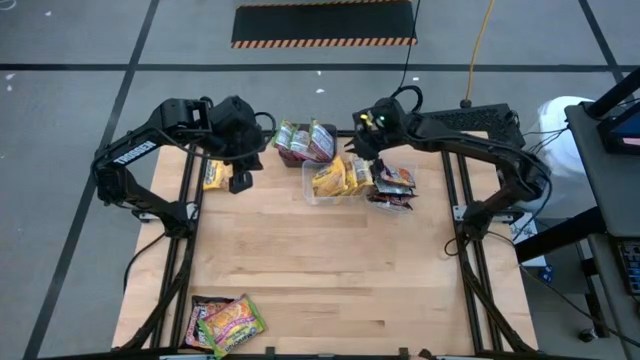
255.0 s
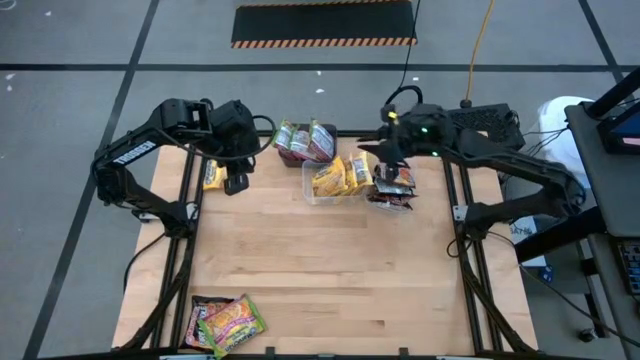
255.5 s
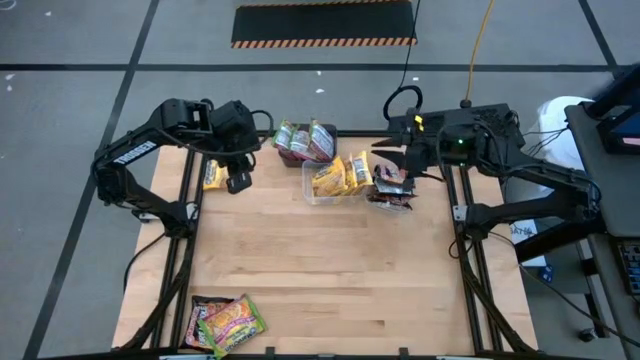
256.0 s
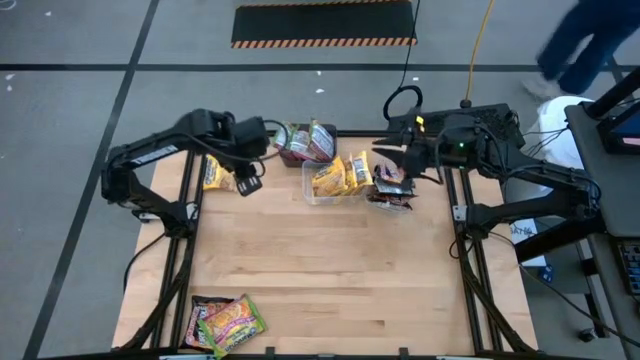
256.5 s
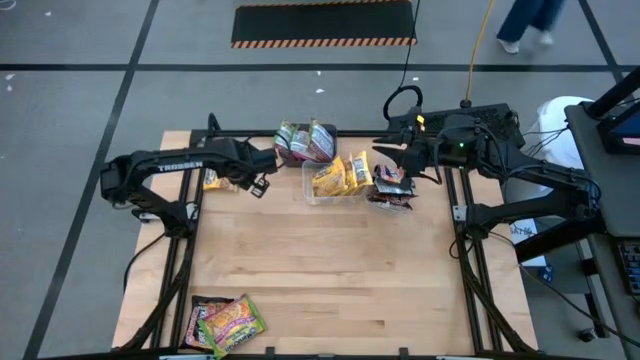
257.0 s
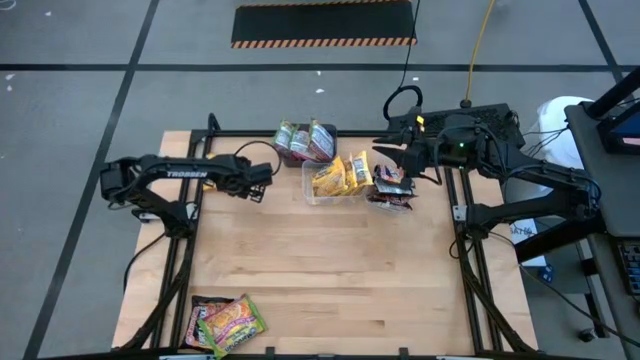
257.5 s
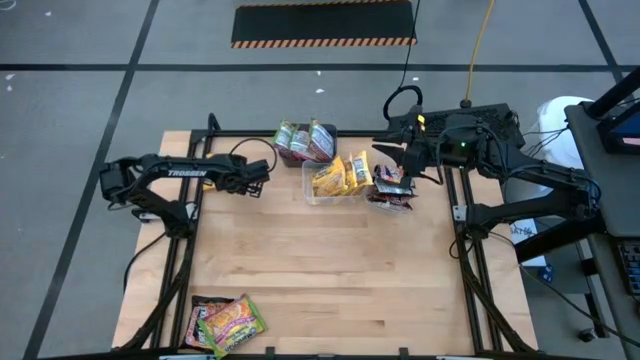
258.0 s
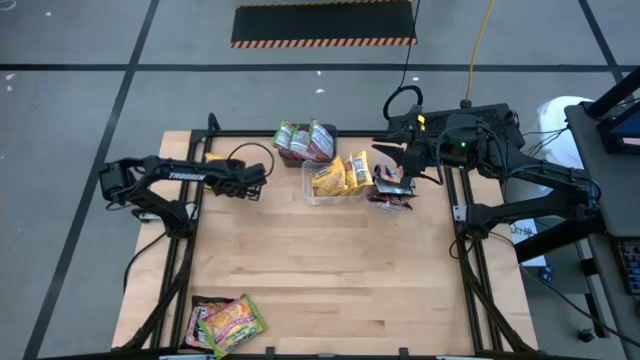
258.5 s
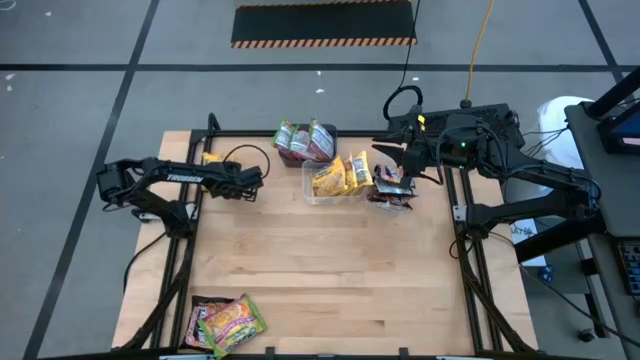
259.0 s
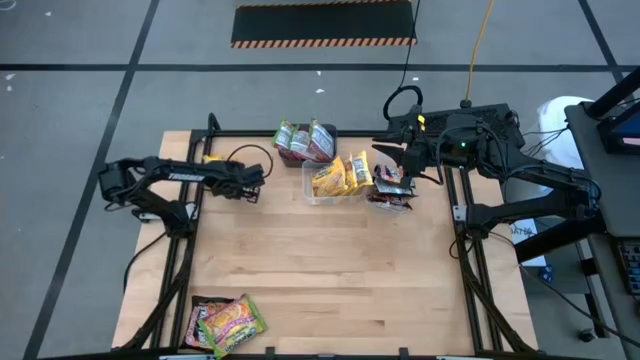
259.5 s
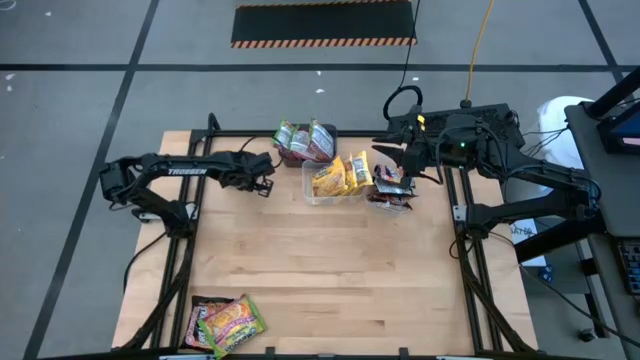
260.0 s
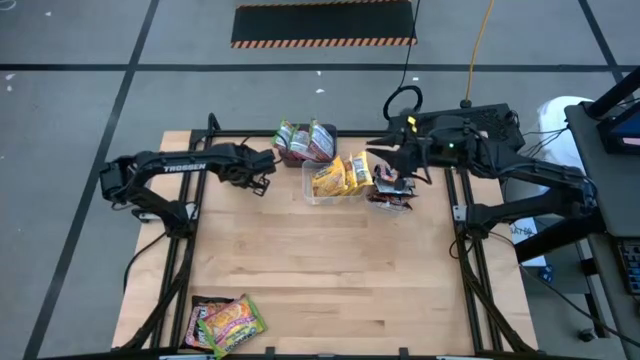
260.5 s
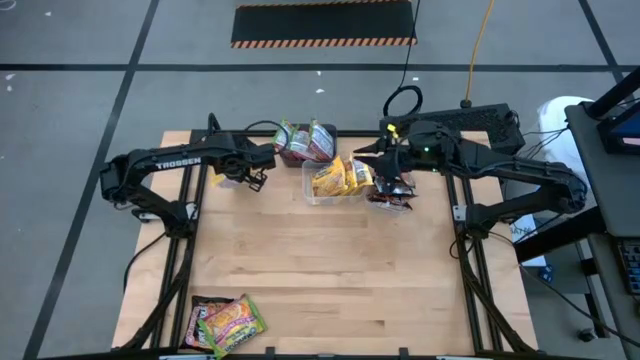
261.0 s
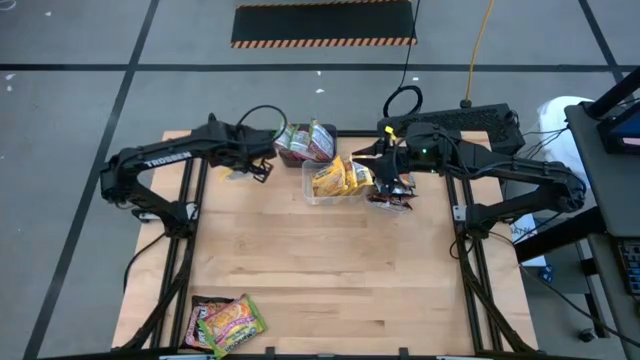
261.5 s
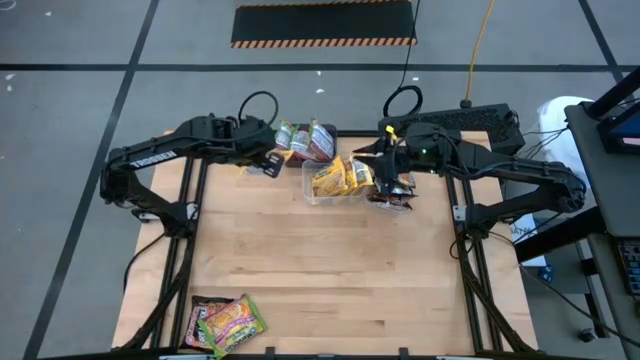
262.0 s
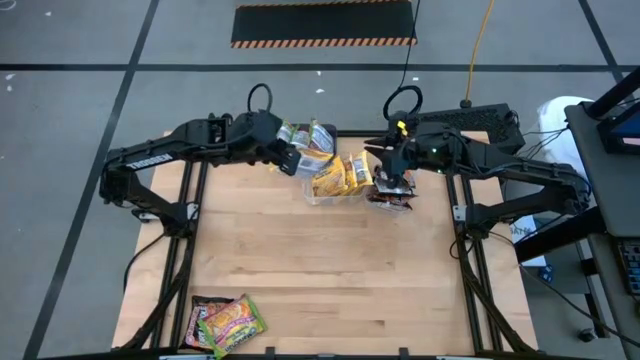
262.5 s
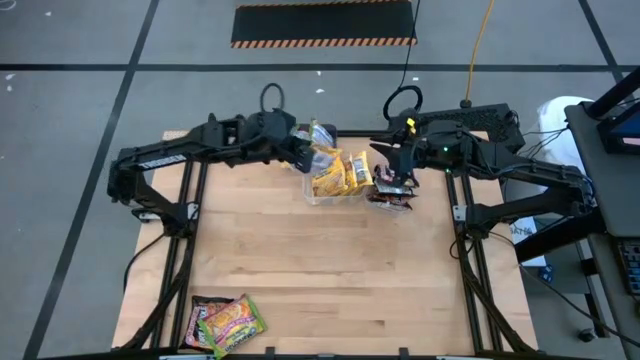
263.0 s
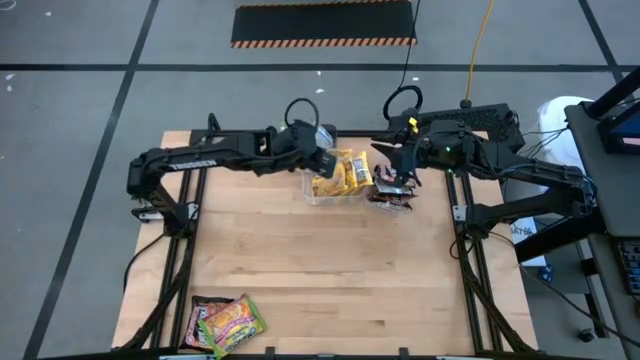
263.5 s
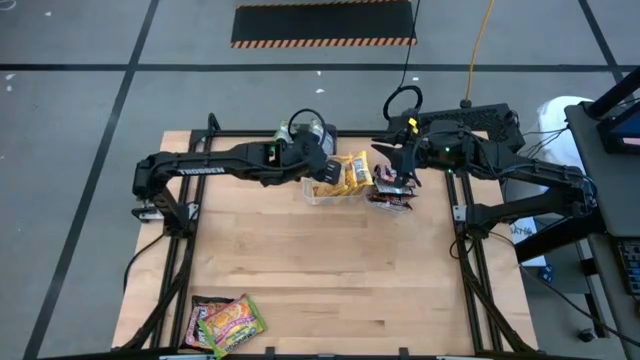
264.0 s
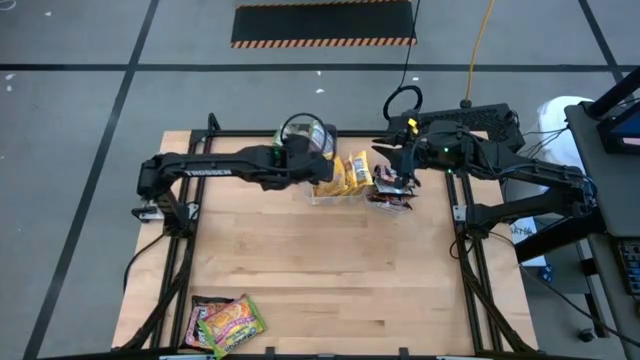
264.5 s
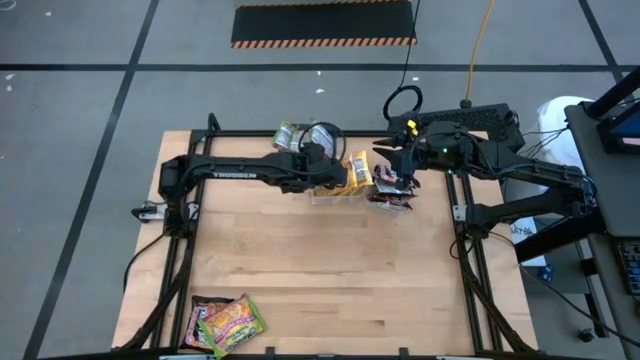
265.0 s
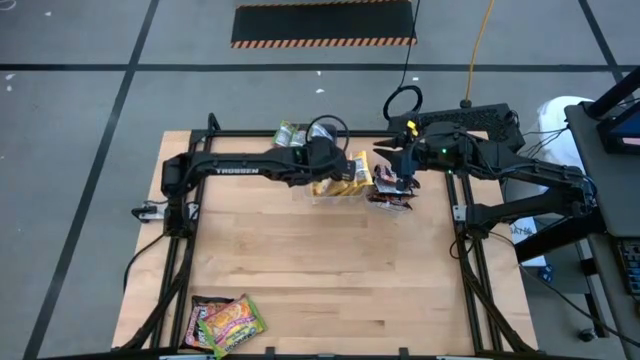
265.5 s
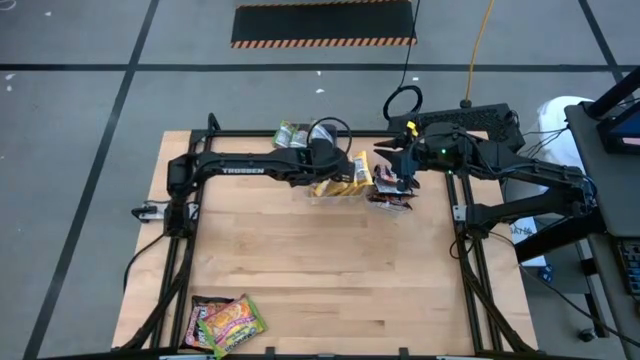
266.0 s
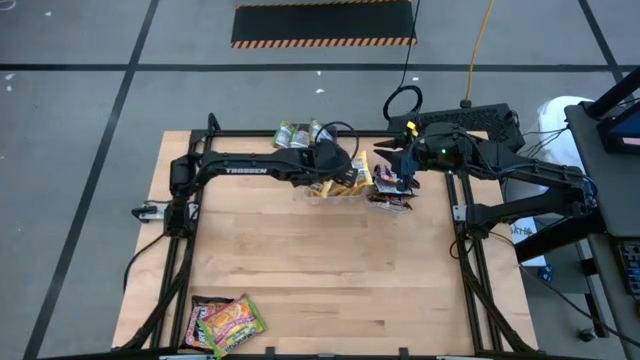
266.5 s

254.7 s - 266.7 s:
Task: Sort Maruchan noodles
Put the yellow noodle pack into the left transparent bin

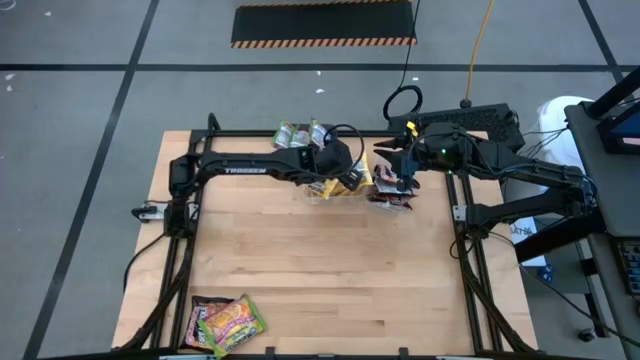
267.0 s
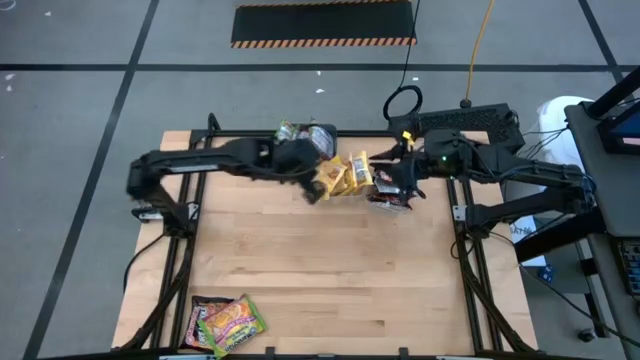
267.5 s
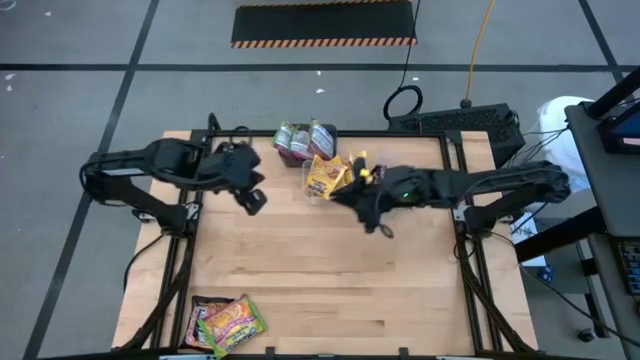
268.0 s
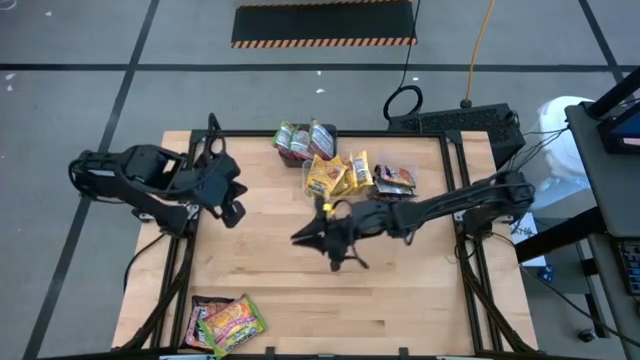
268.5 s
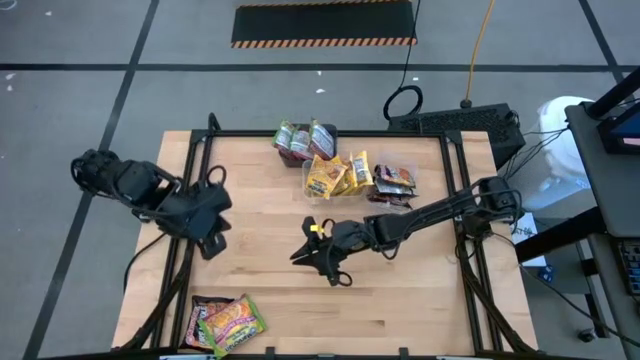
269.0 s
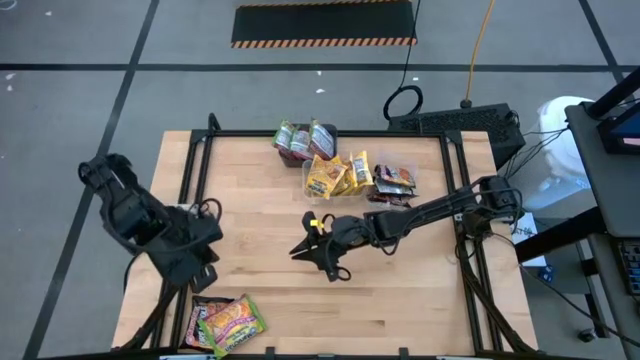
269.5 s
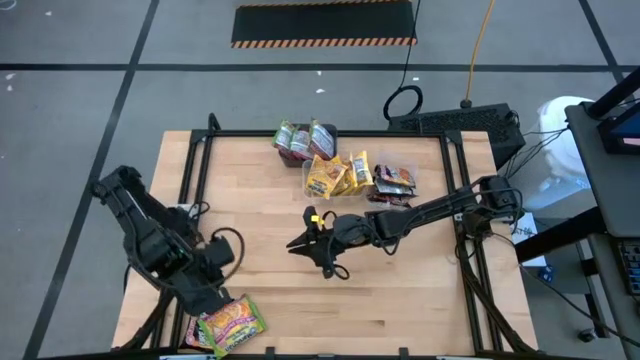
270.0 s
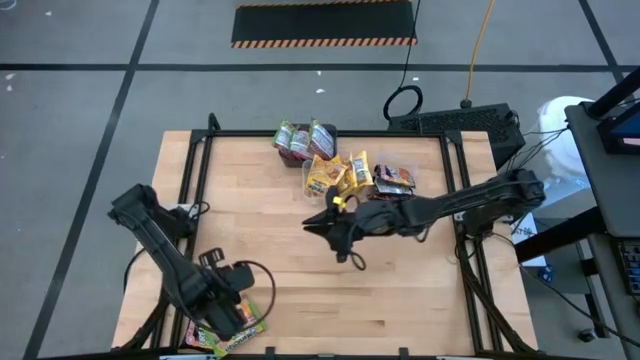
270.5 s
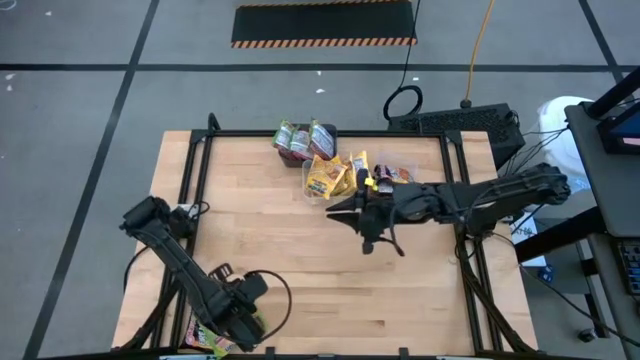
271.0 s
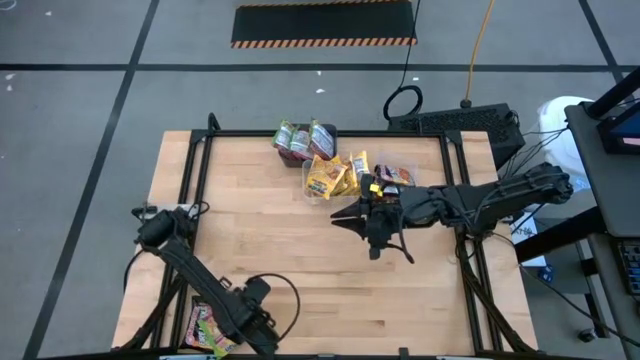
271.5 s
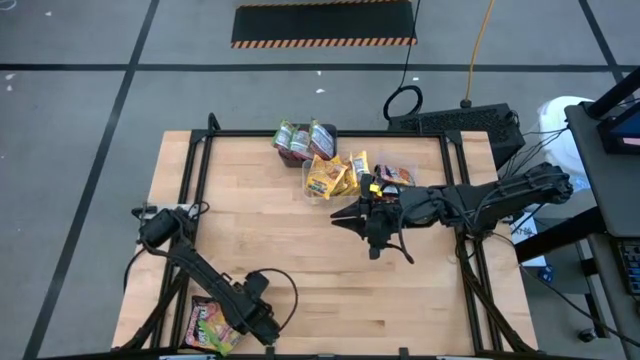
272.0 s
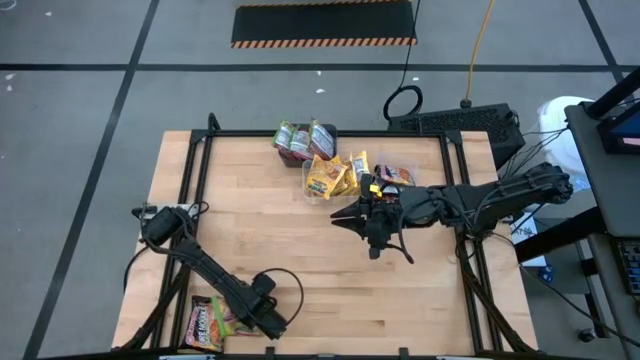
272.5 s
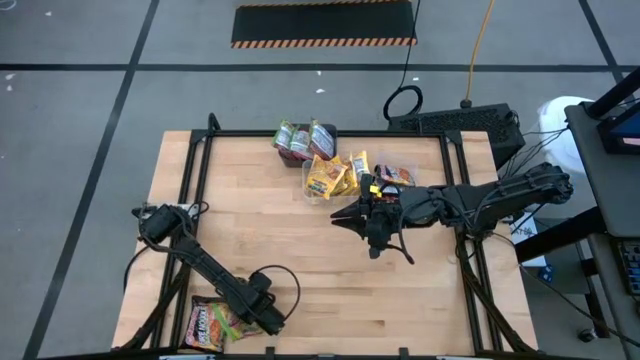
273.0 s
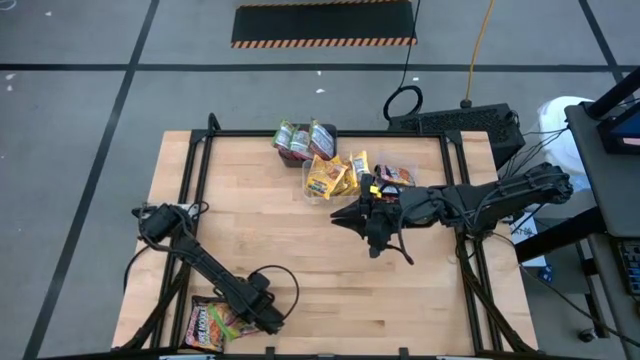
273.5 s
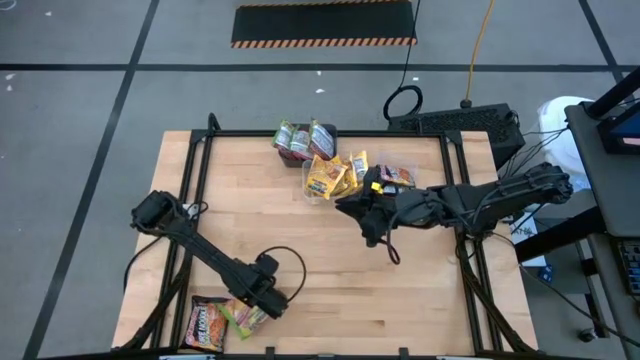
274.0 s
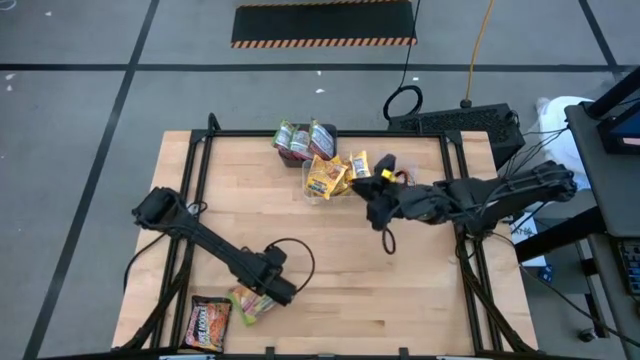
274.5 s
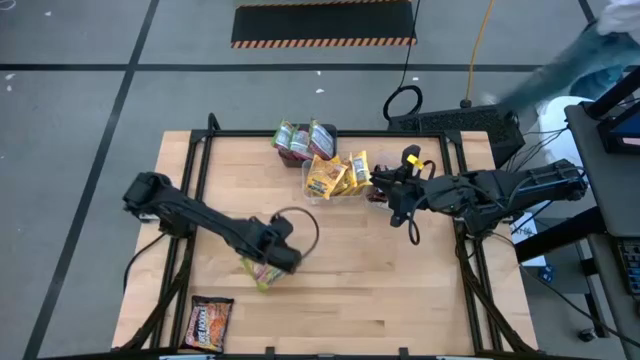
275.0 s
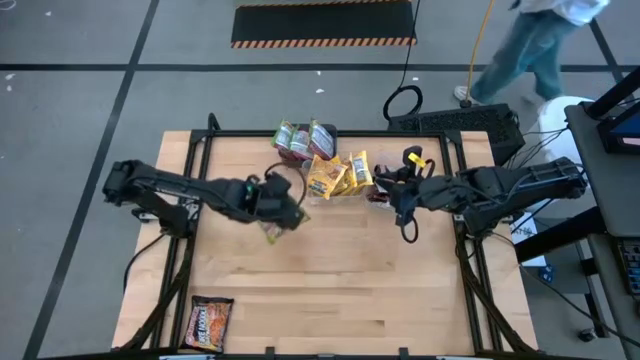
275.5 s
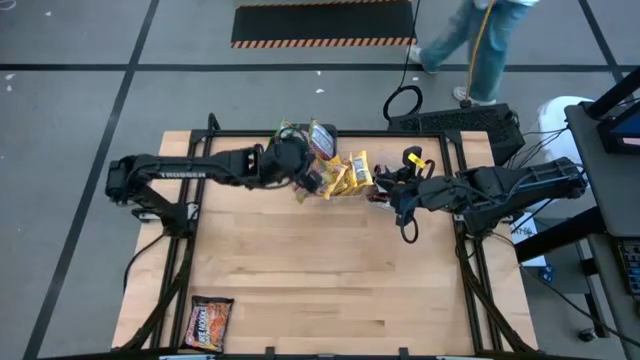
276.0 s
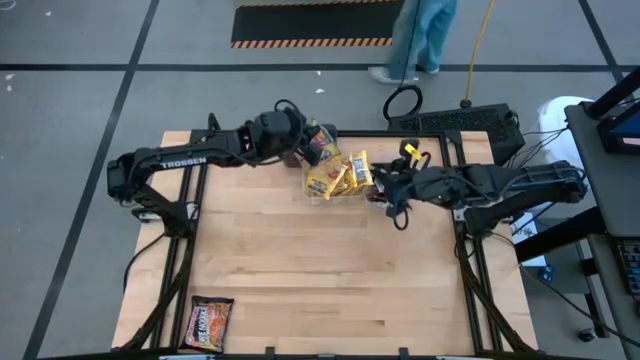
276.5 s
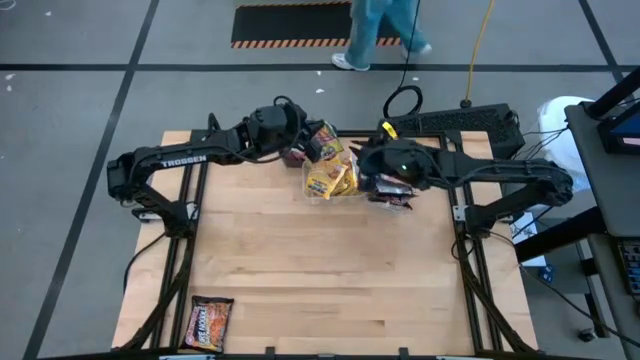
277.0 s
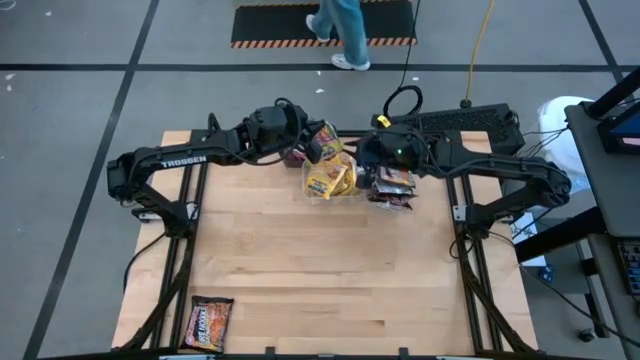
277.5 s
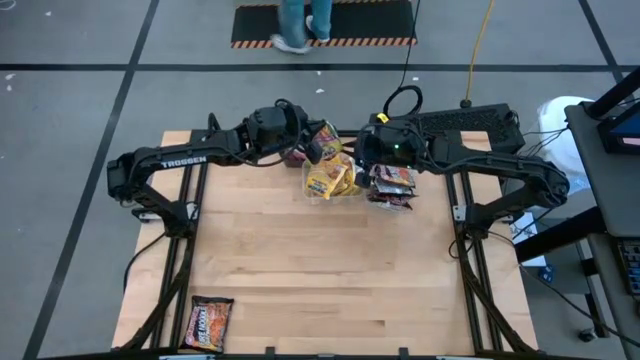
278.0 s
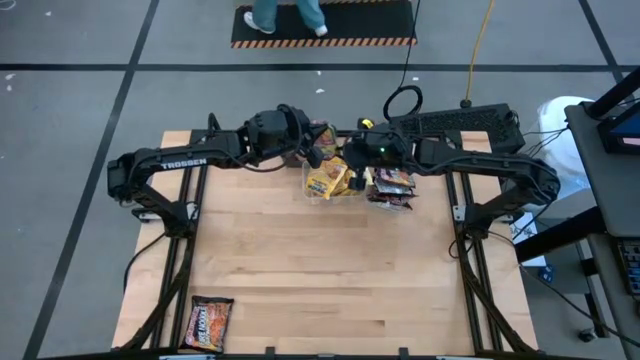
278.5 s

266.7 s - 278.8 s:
Put the green noodle pack into the black bin
